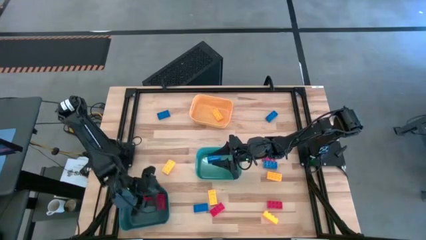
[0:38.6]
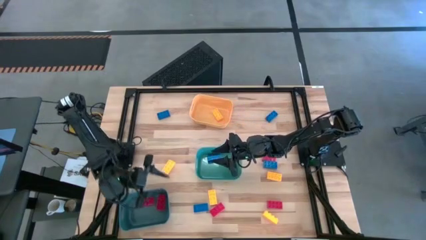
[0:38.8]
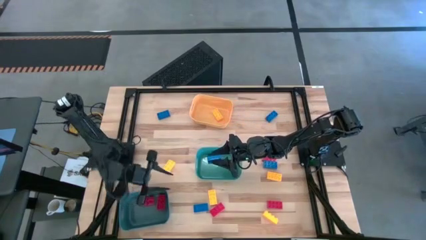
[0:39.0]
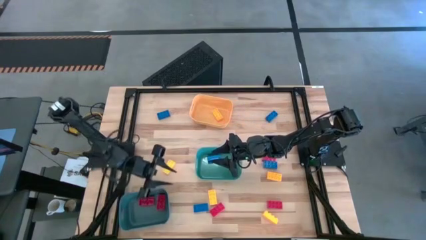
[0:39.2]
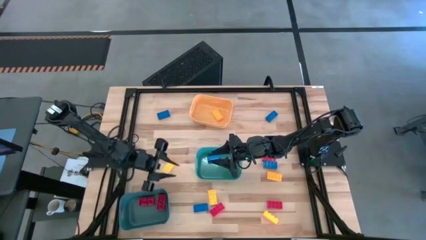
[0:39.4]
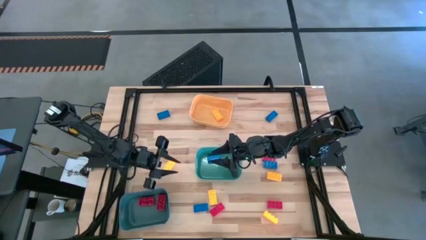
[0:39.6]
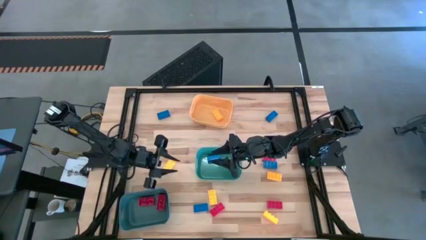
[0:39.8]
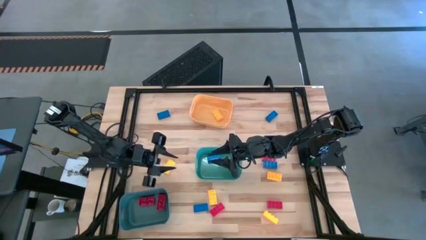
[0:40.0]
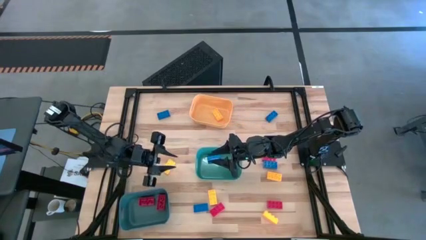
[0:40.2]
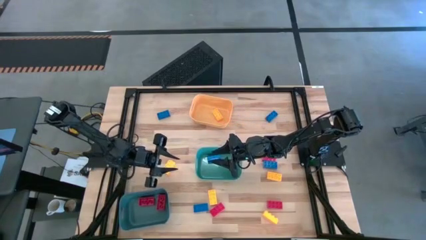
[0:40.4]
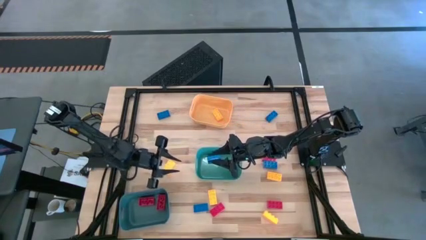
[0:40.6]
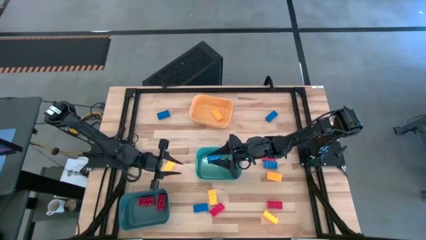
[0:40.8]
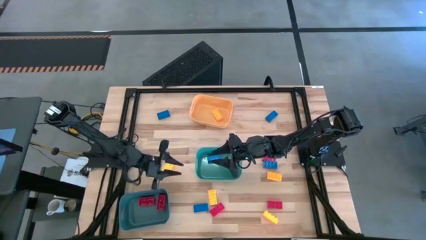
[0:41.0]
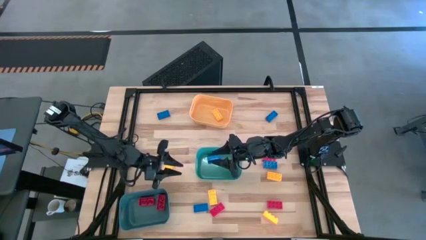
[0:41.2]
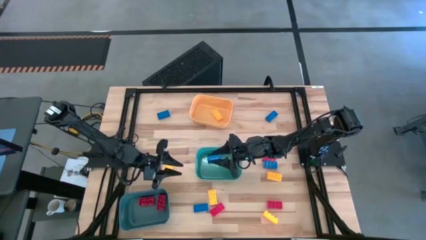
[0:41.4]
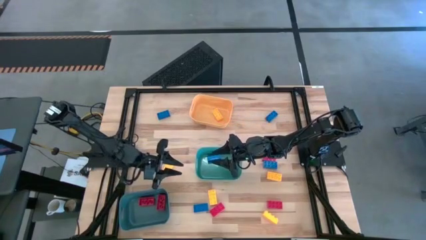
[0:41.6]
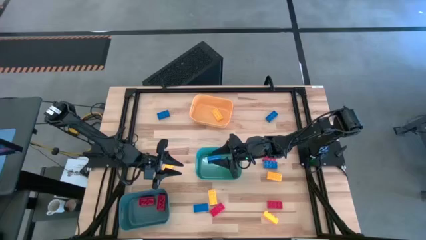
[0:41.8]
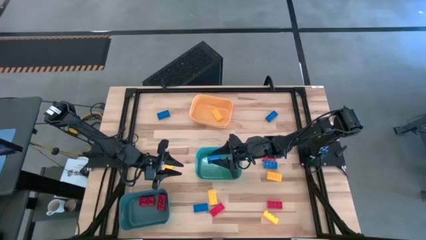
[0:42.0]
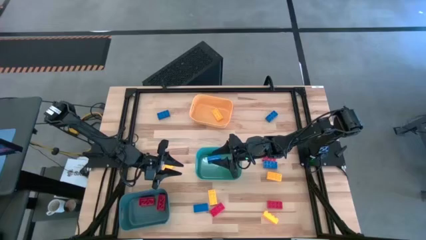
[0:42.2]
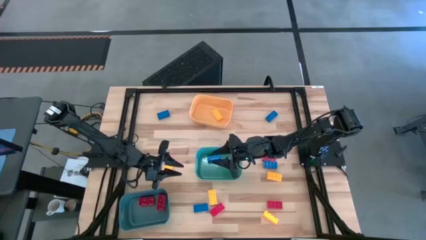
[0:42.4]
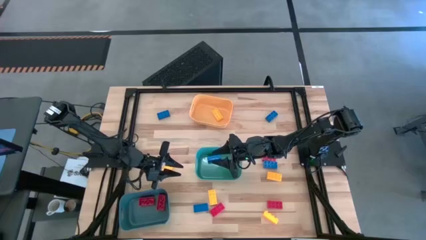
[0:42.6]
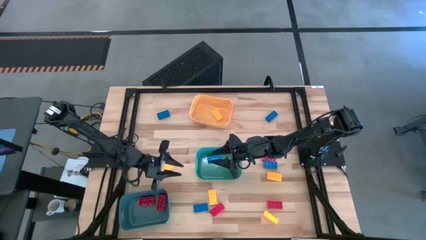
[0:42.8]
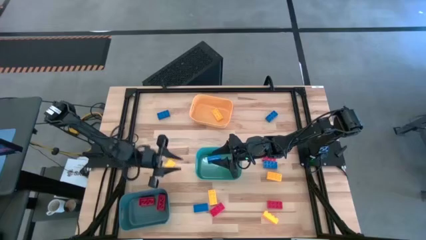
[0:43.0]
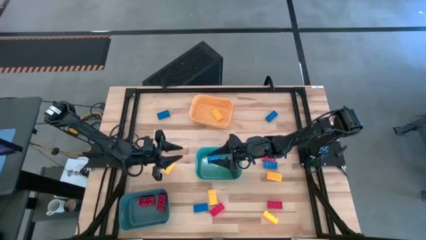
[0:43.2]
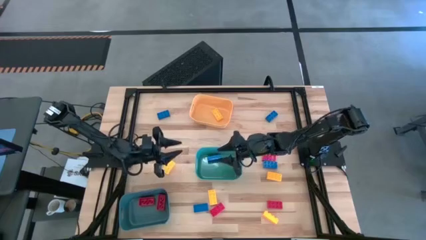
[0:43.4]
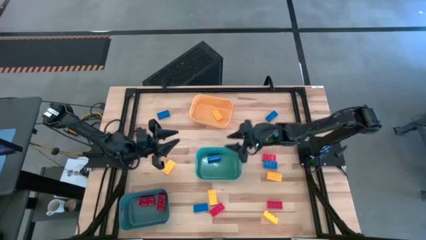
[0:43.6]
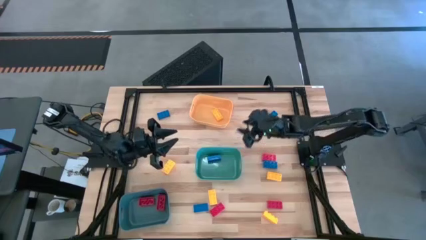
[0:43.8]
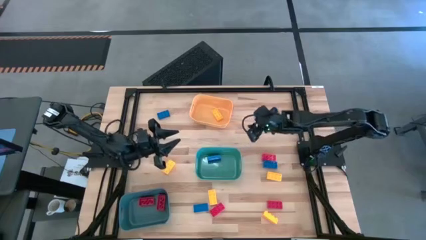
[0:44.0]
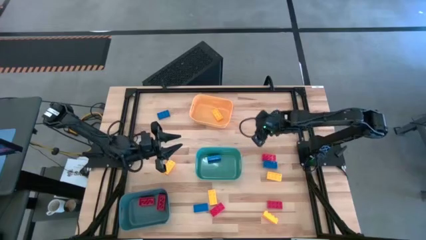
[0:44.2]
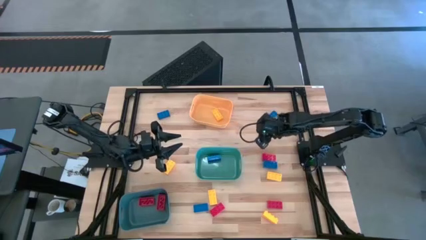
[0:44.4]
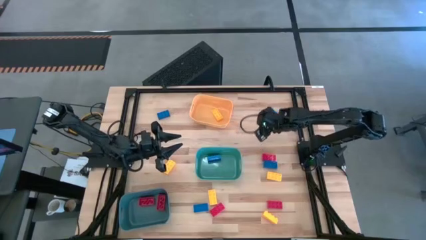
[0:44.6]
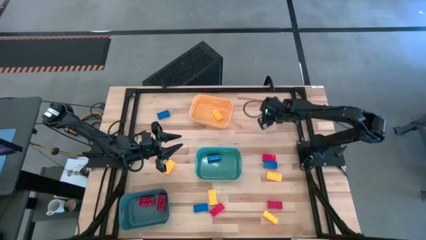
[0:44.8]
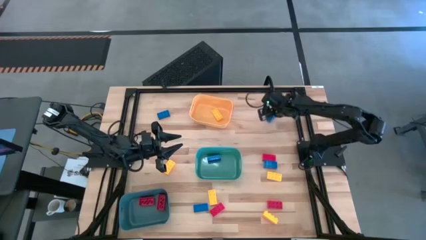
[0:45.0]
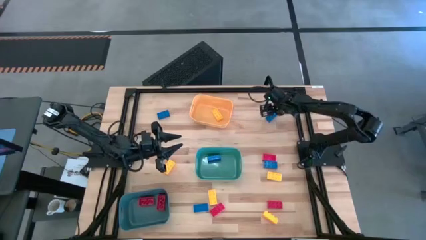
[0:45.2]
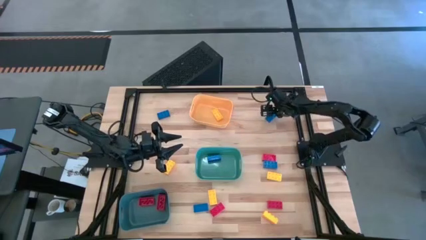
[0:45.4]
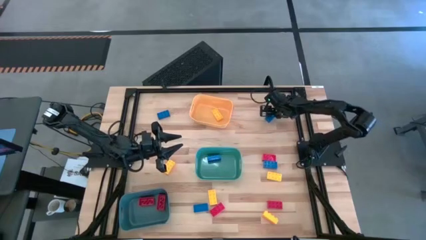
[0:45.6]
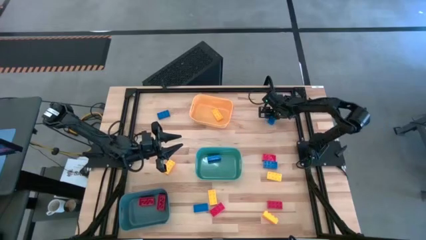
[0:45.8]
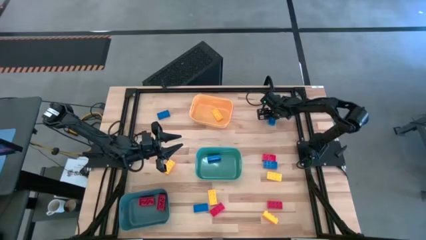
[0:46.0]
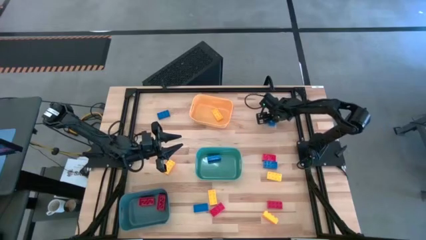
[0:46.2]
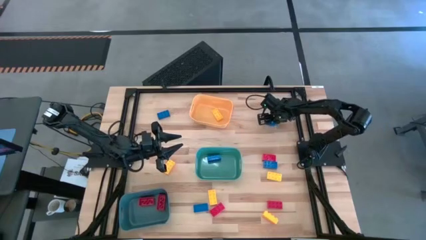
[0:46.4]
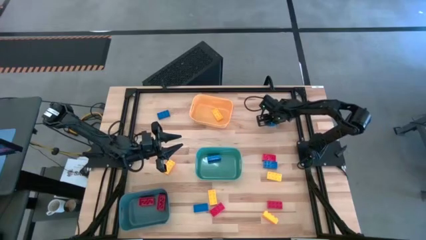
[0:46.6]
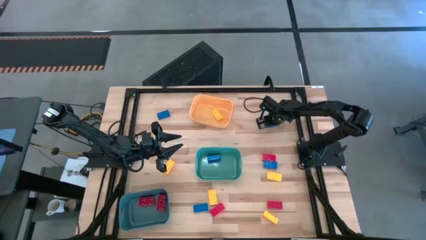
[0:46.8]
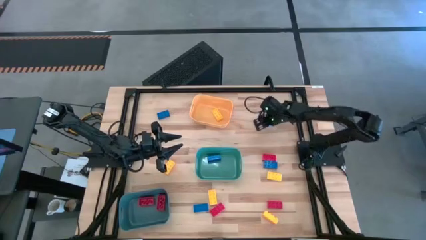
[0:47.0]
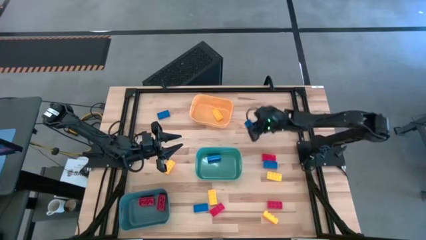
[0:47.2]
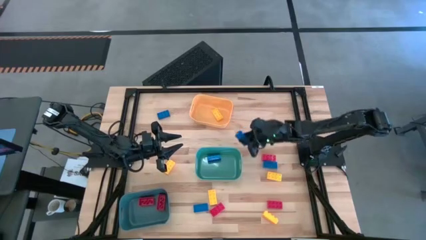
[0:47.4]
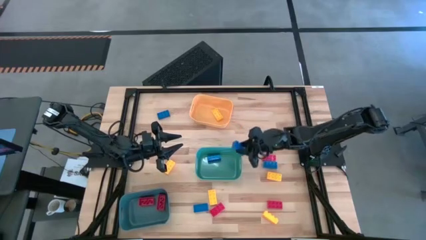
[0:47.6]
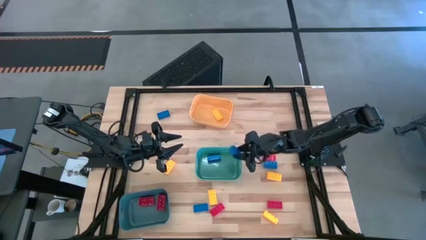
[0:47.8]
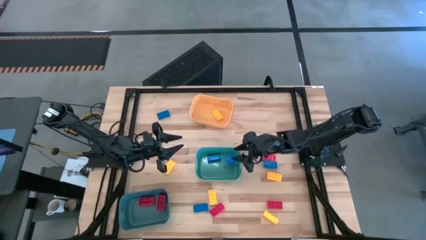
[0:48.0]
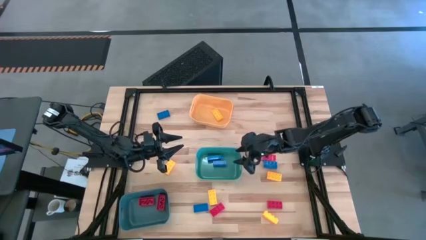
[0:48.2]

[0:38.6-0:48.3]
Task: Sort & place blocks by color
Put the blue game piece into the green bin

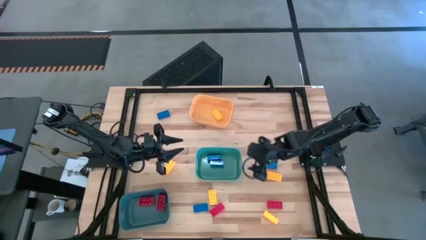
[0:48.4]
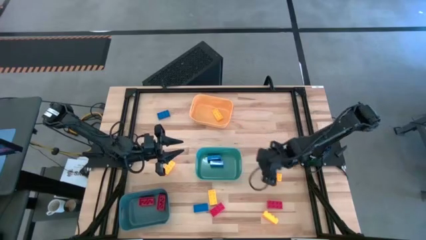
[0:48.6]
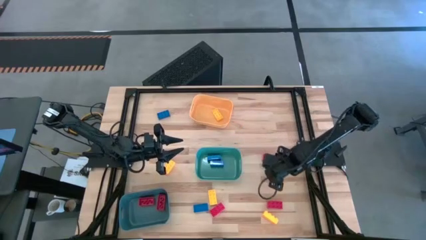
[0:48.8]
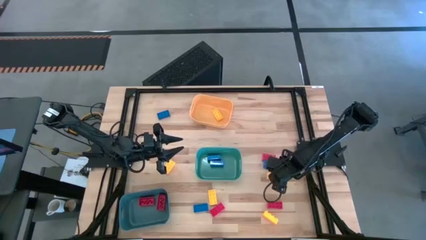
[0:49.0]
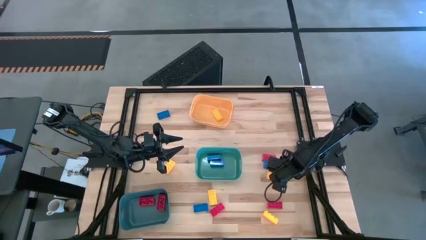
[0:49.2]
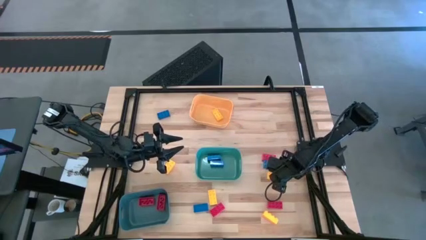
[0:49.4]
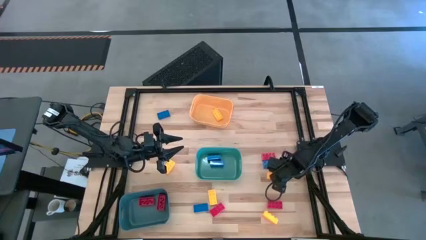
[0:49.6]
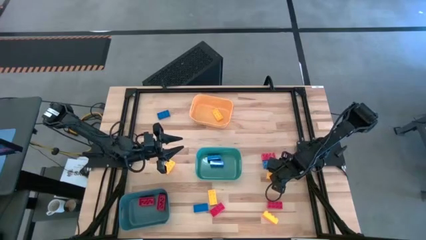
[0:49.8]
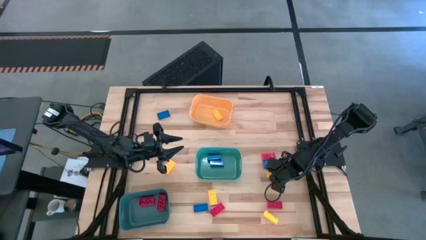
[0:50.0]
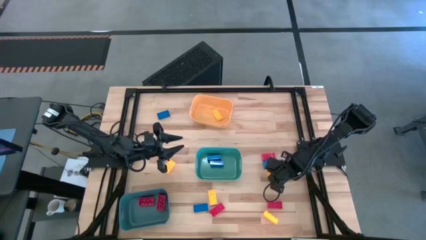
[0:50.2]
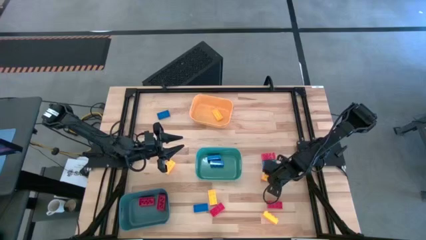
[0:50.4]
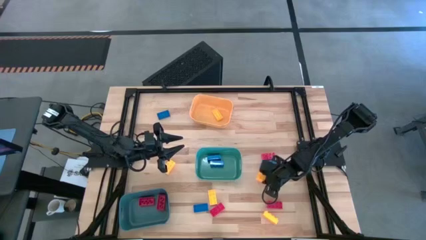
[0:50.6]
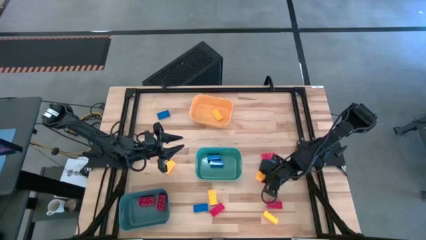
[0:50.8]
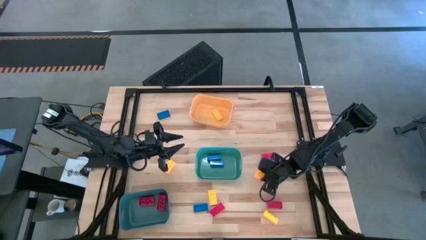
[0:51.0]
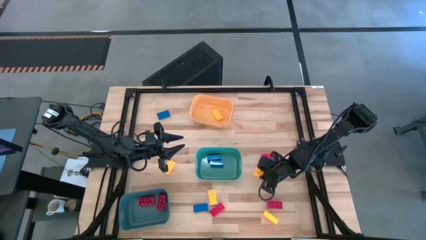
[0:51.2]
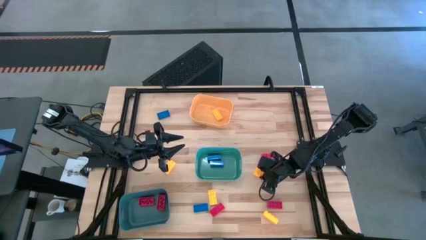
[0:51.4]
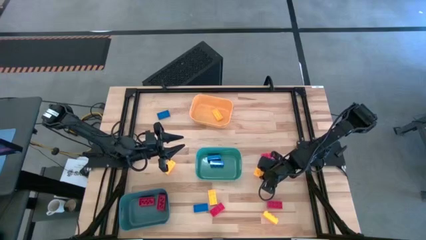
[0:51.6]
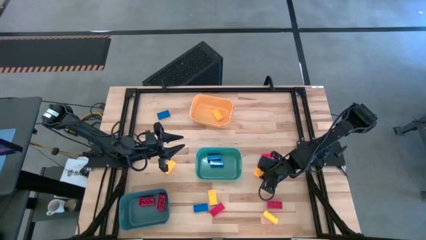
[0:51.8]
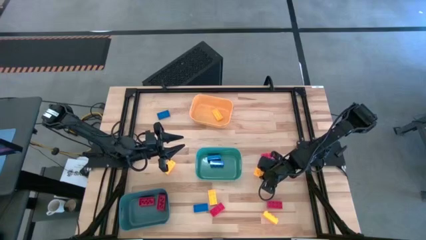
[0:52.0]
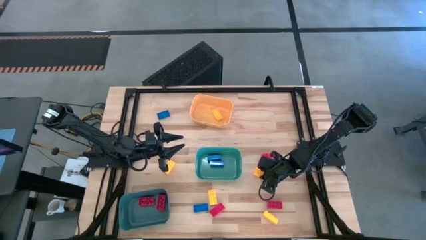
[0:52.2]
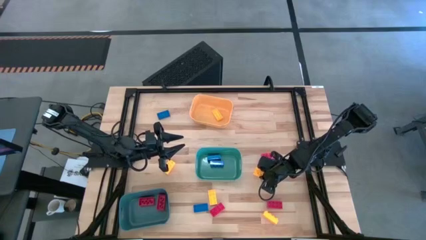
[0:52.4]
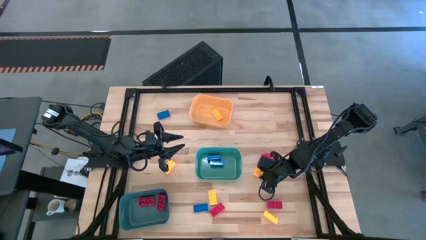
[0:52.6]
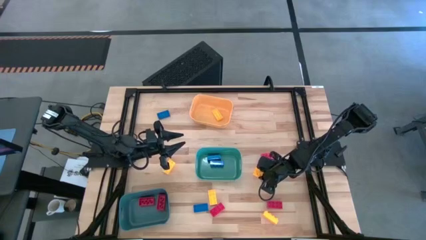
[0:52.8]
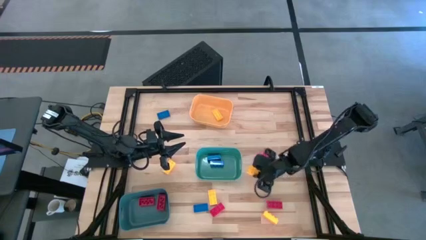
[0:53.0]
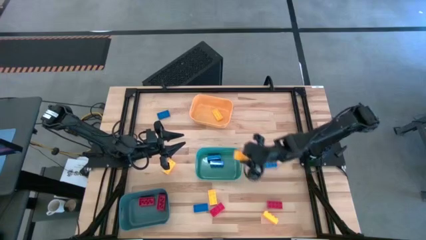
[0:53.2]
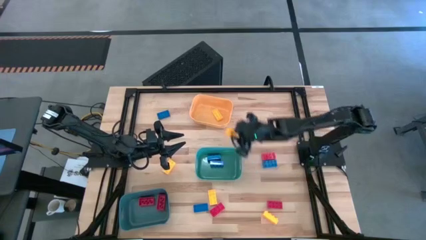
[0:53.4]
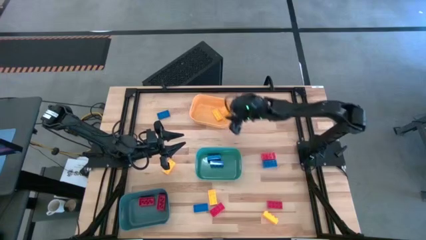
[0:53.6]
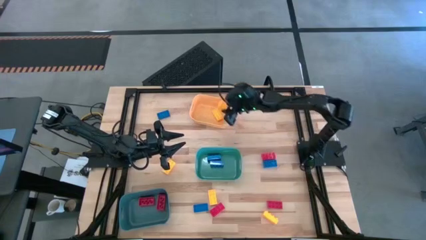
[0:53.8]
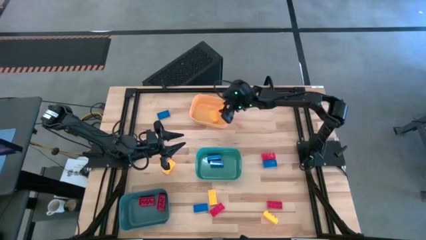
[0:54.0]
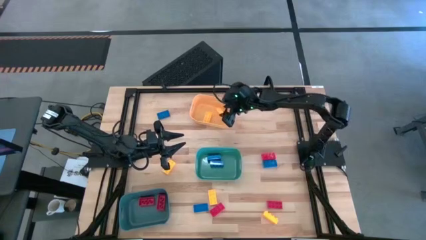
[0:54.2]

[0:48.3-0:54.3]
Put the yellow game piece into the yellow bin
